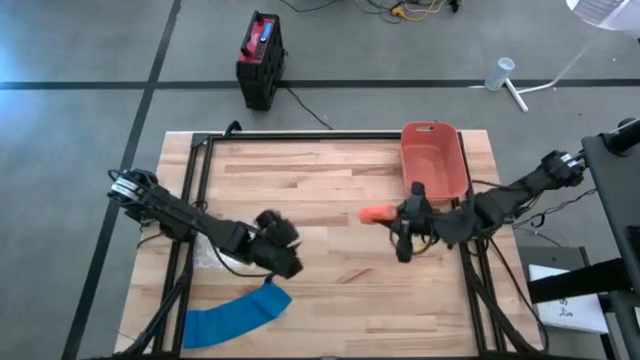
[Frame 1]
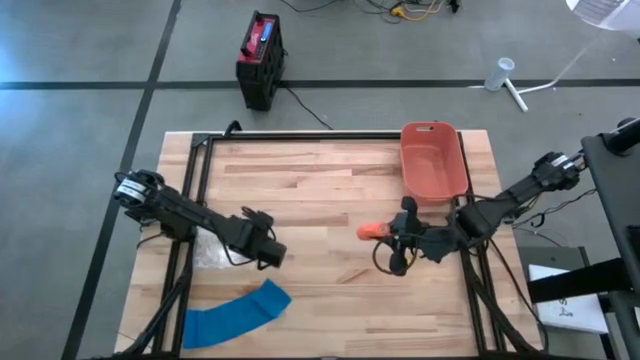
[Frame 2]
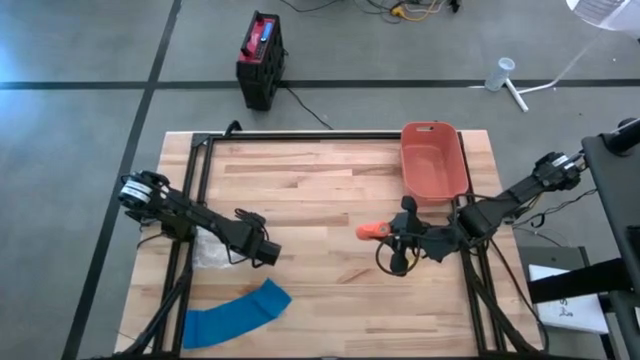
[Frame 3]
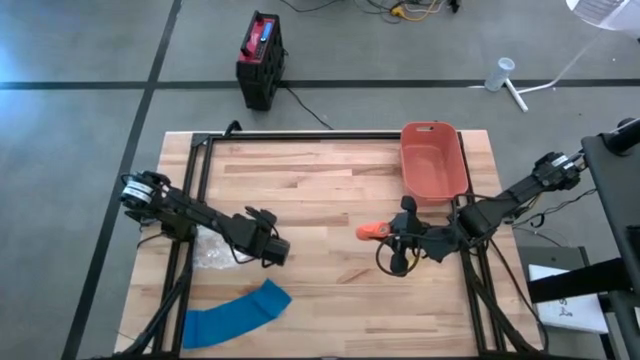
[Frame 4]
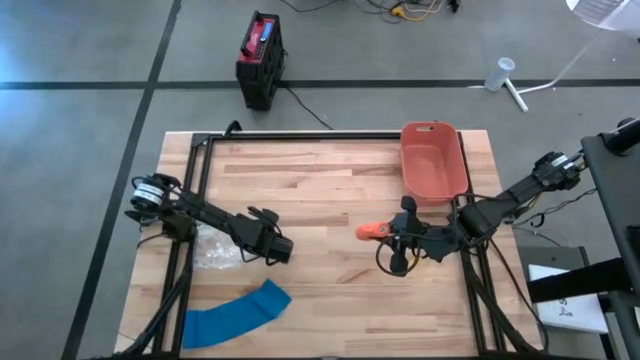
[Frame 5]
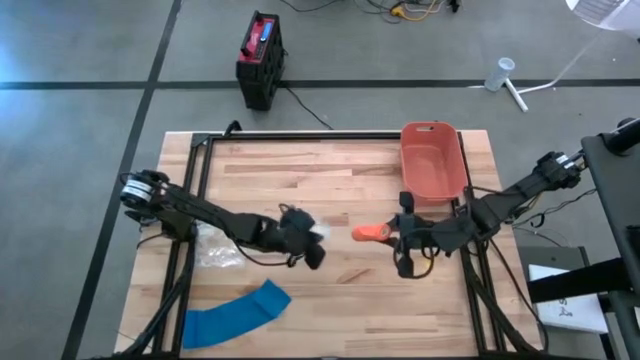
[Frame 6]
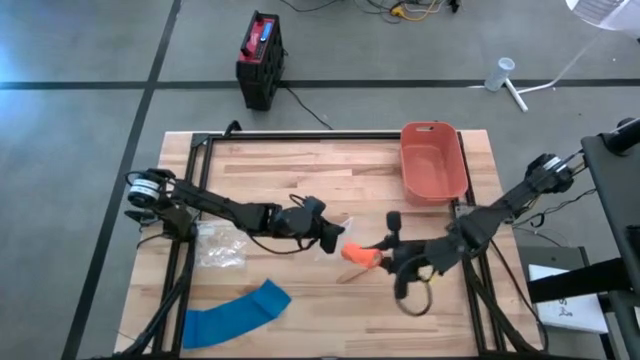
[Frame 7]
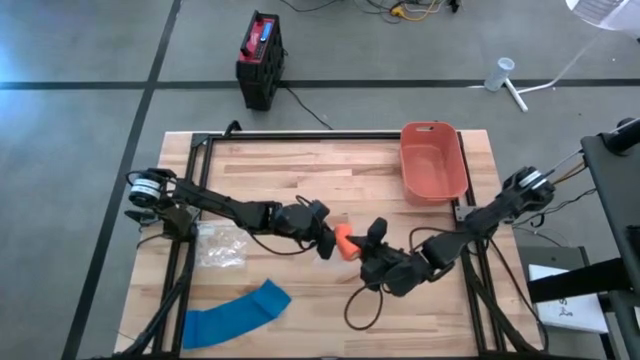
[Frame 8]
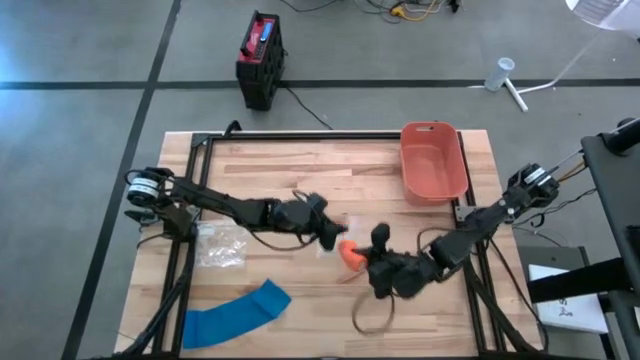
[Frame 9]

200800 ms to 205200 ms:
Task: Roll bandage
Put the orange bandage into the transparent zip bag

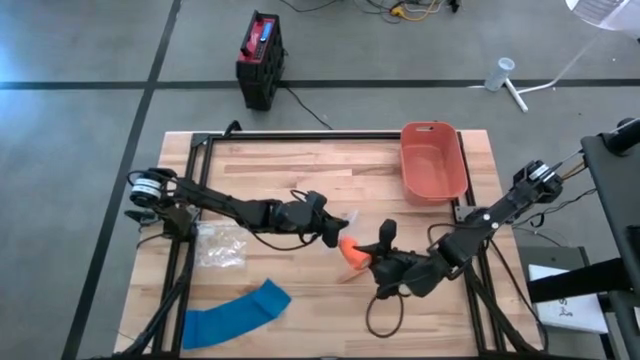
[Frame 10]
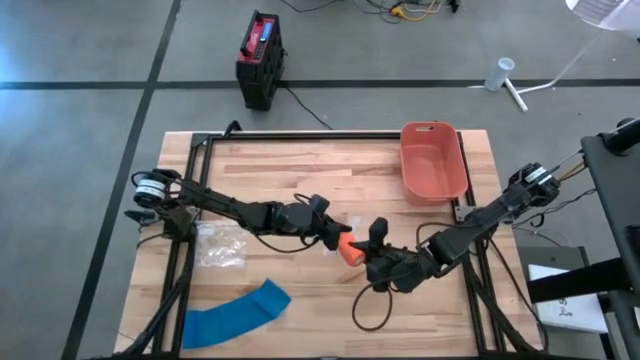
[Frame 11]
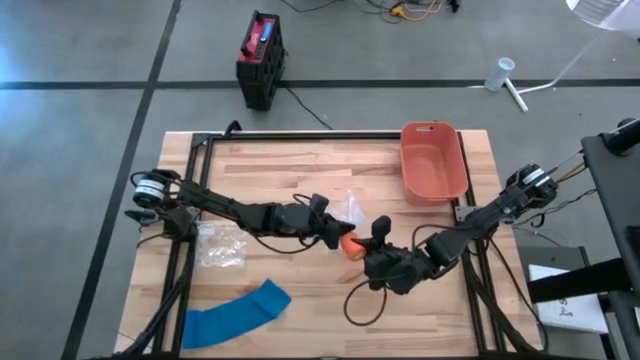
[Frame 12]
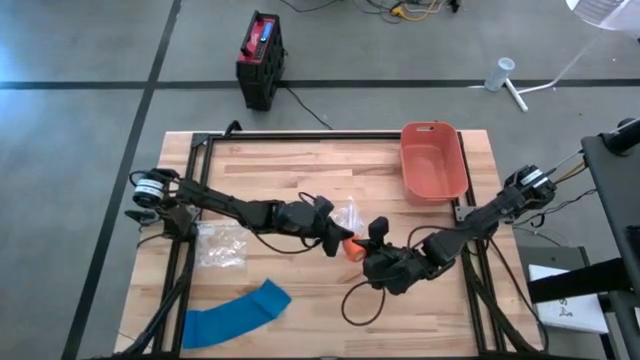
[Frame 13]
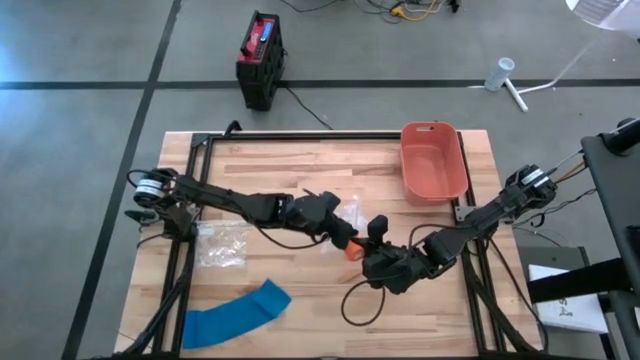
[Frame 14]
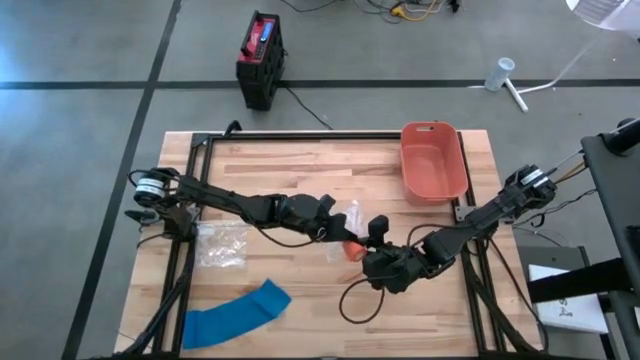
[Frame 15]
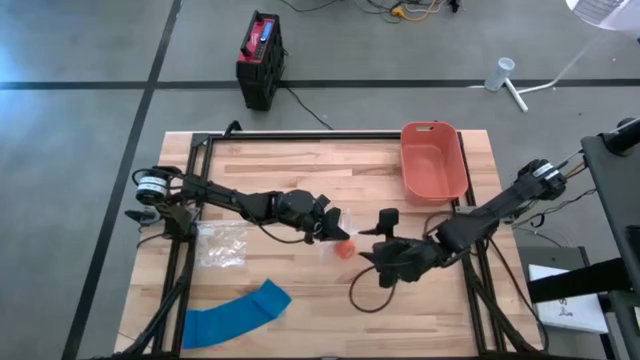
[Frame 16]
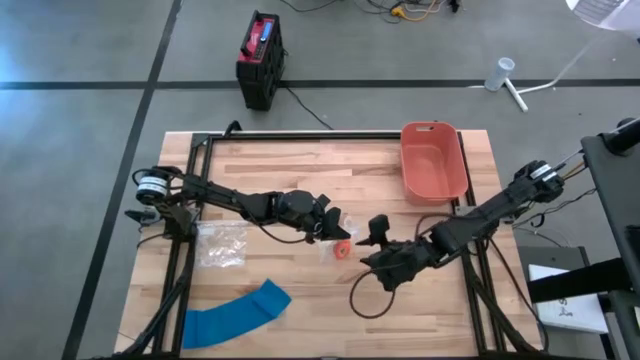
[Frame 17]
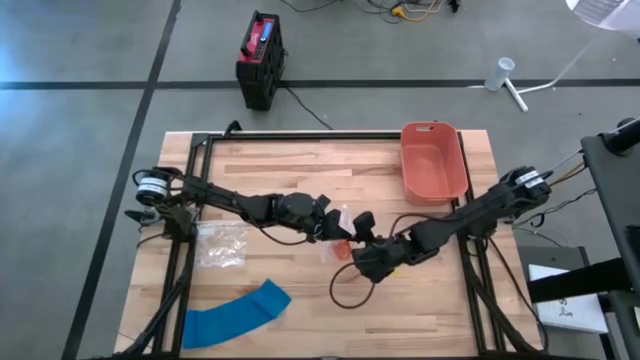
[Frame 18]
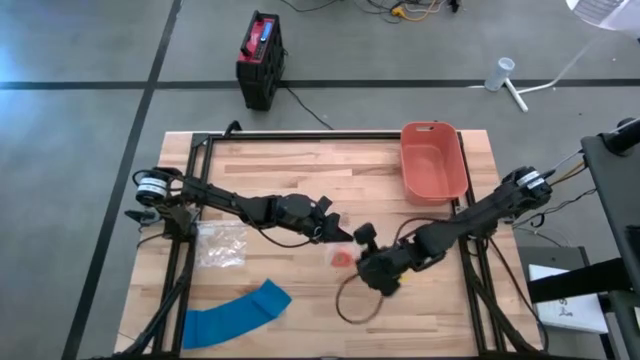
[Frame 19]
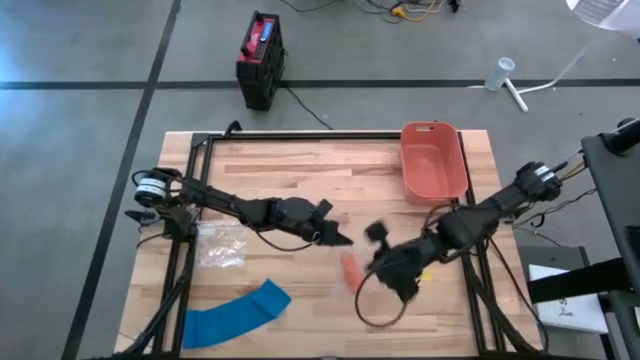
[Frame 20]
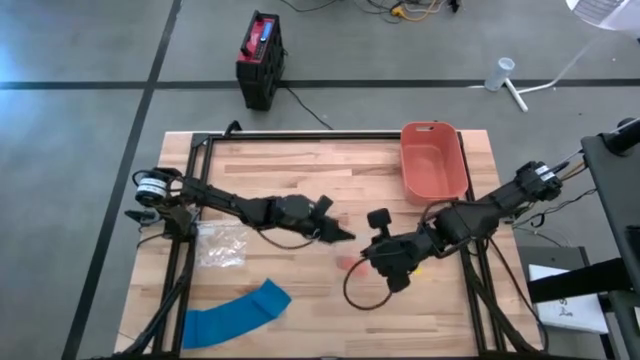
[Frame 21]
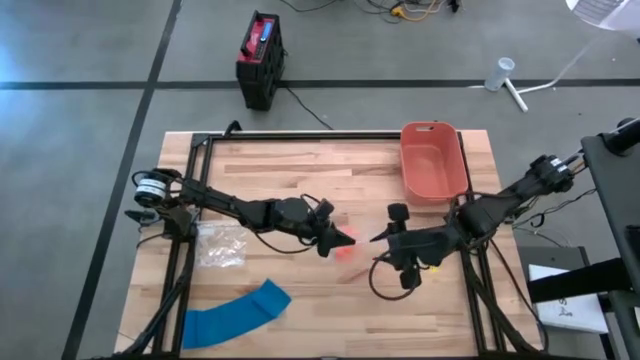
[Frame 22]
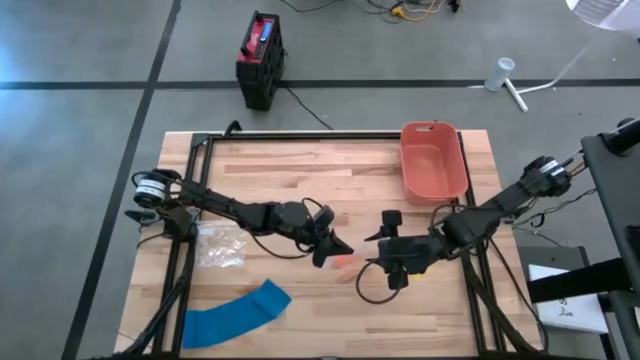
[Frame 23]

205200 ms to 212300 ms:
Put the orange bandage into the transparent zip bag

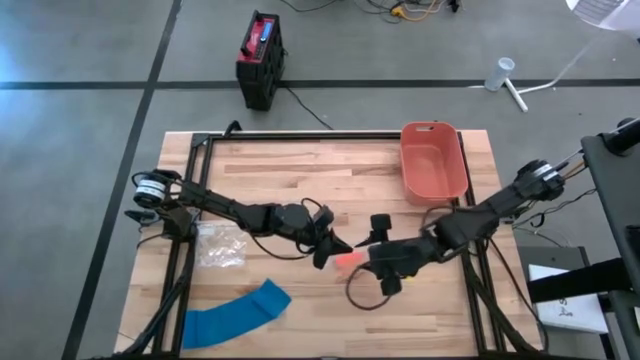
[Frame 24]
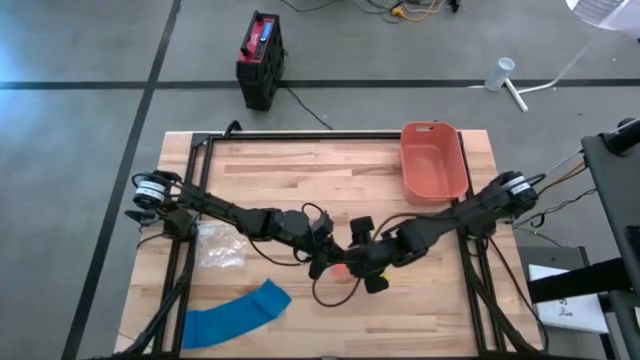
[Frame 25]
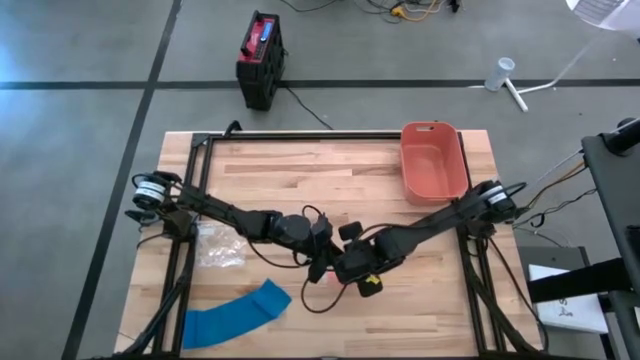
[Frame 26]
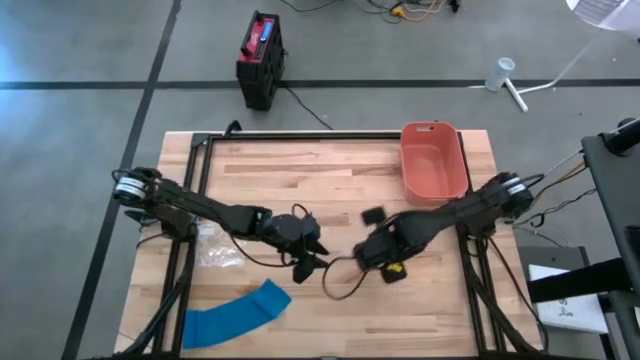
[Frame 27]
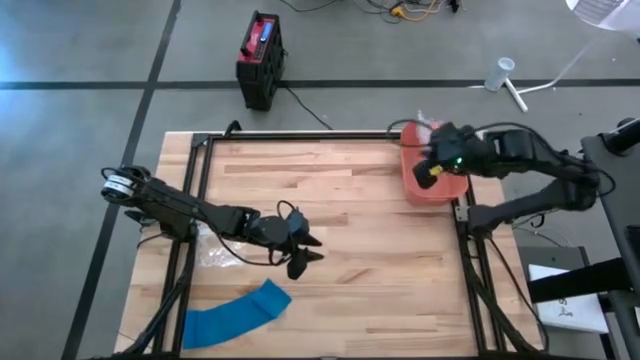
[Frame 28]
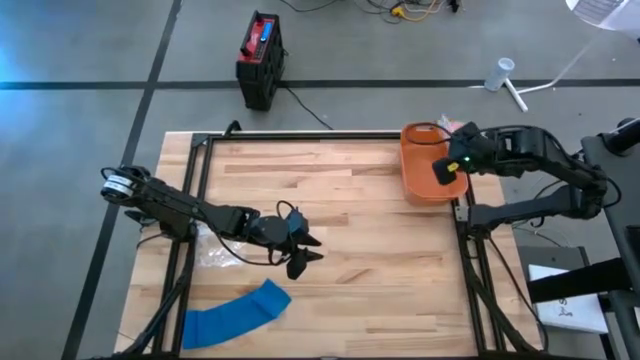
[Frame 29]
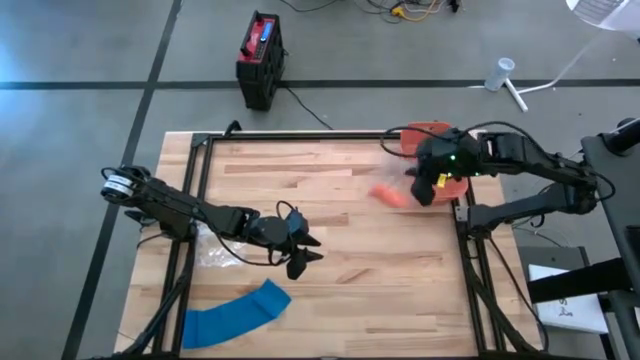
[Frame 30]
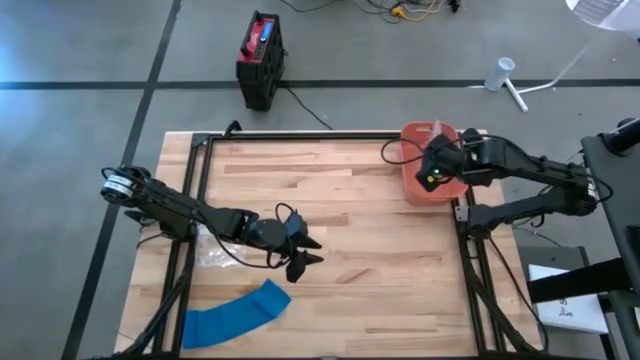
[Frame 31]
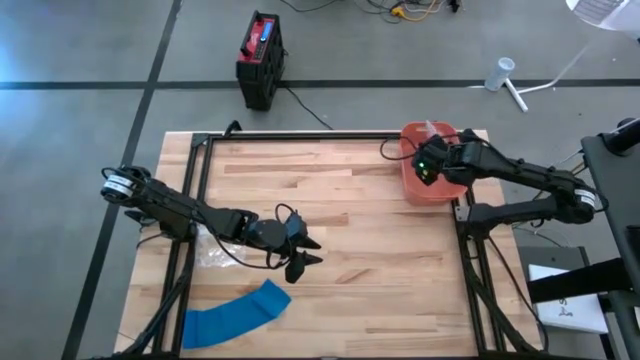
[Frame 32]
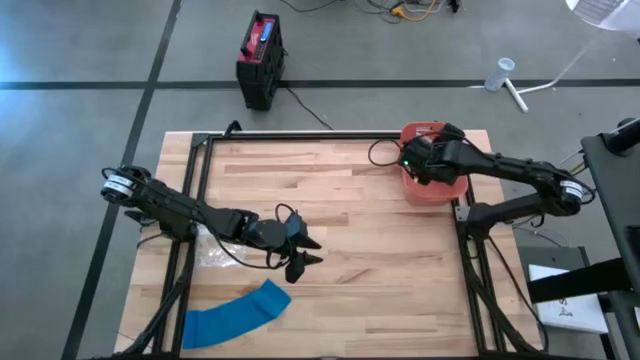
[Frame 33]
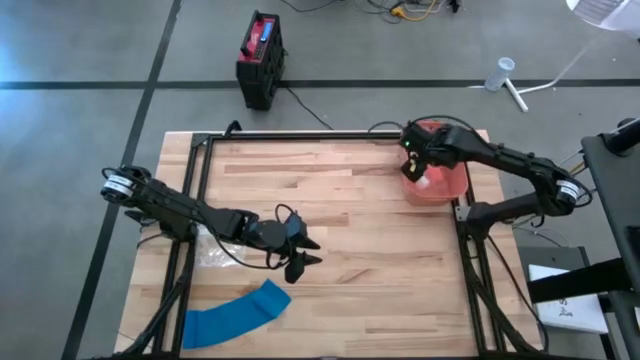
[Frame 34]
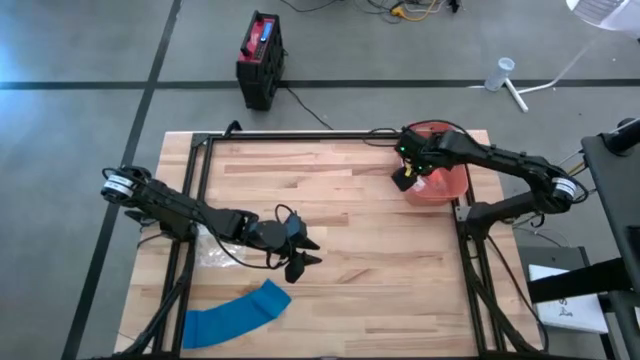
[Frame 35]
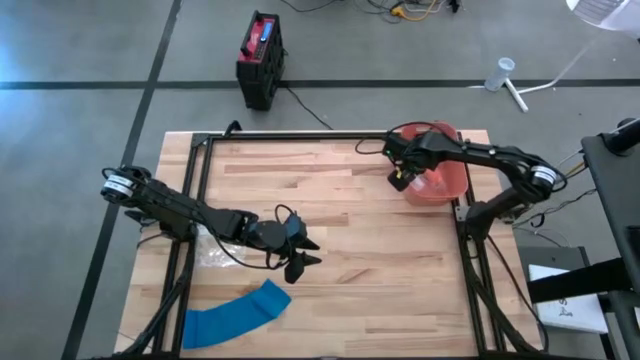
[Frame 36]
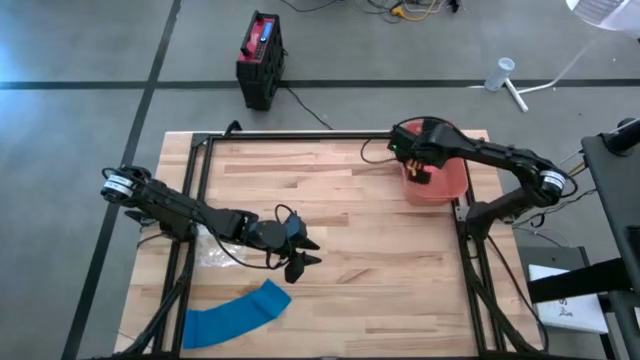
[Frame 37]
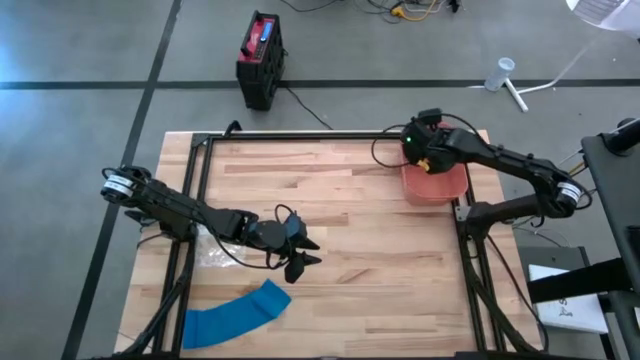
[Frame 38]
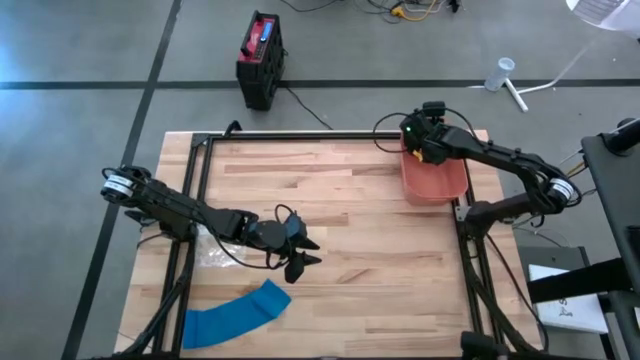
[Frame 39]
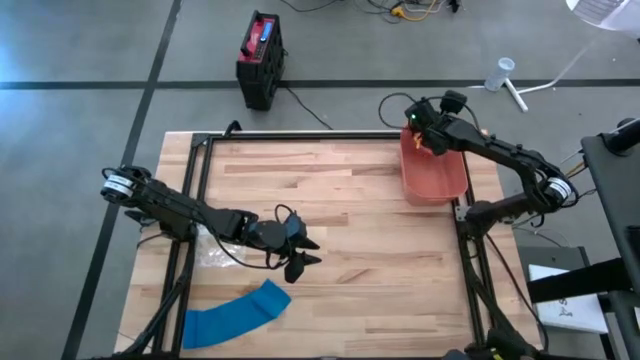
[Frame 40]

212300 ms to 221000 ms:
Put the transparent zip bag with orange bandage into the orange bin

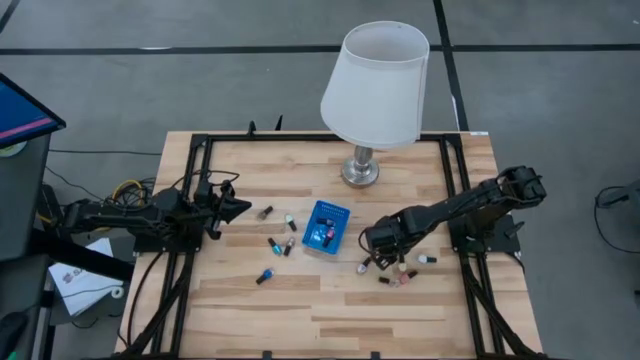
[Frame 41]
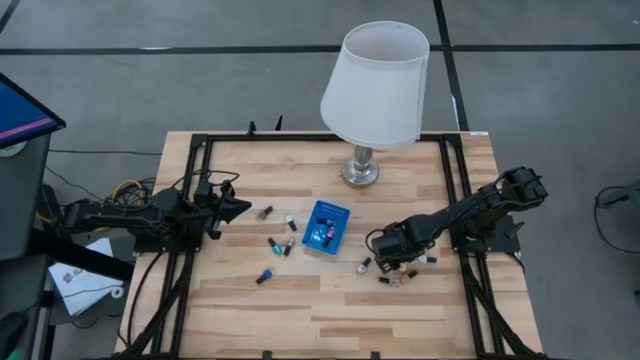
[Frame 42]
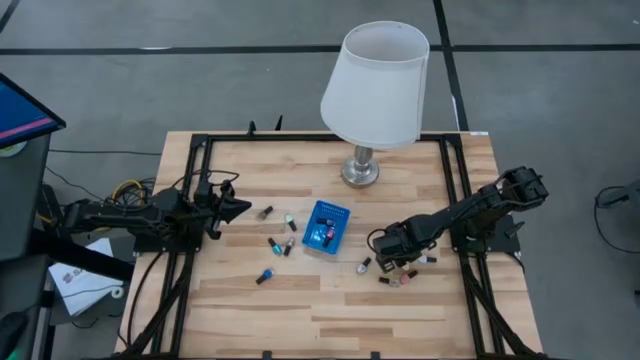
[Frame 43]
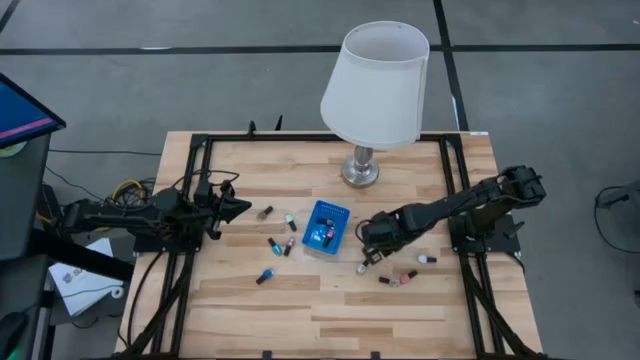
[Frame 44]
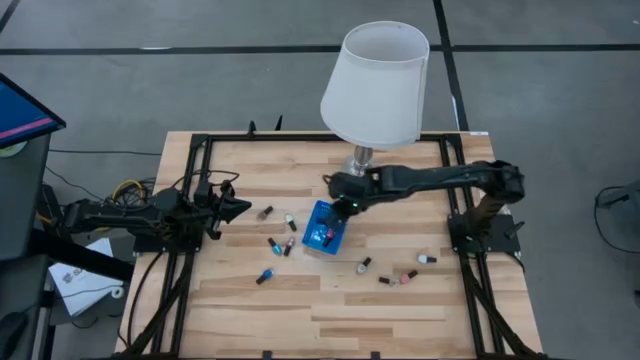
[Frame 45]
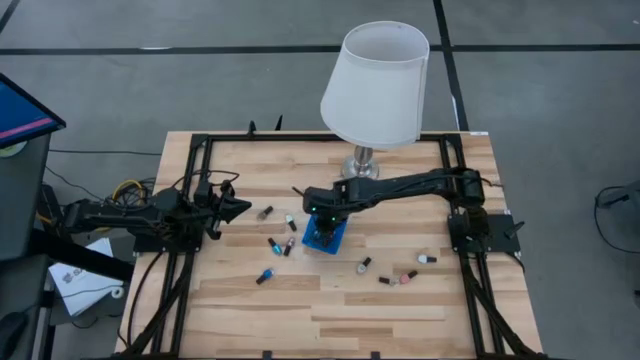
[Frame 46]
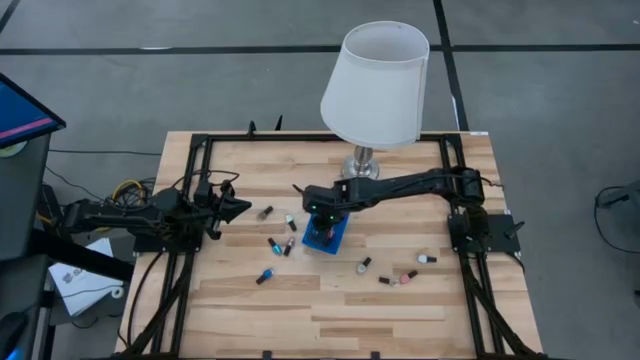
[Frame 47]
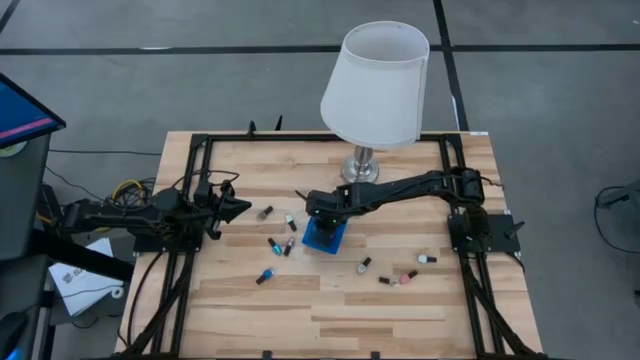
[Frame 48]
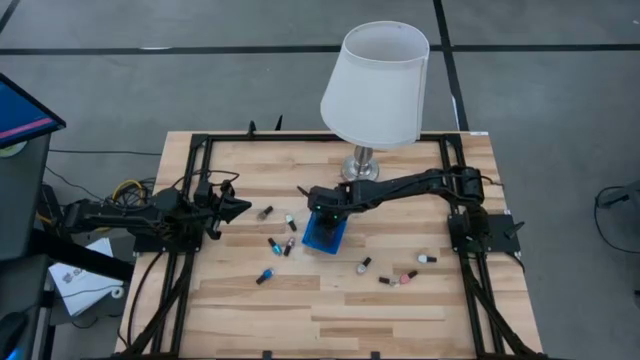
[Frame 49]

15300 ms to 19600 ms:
Task: Pick & Place Nail Polish
Put the yellow nail polish into the blue basket
